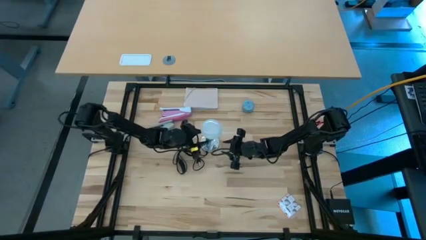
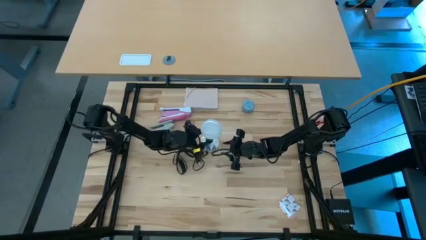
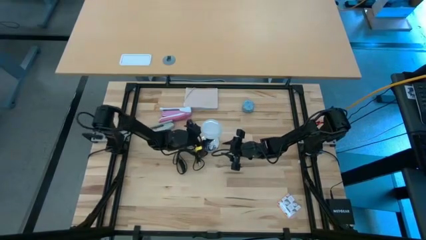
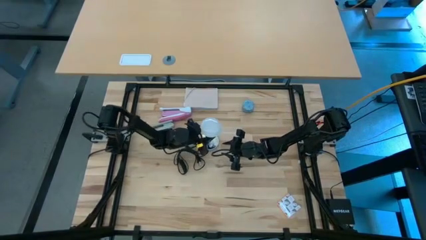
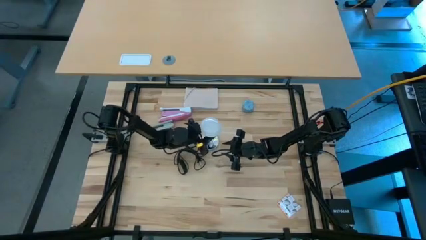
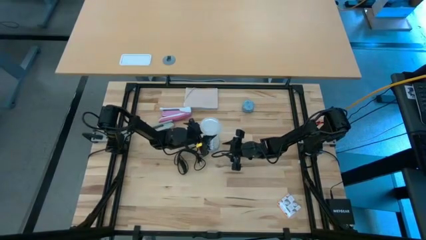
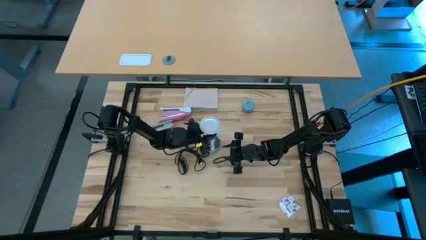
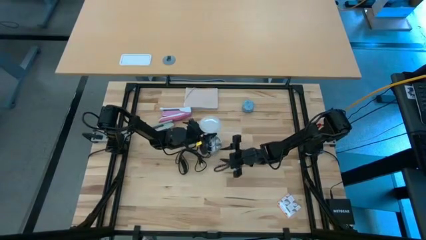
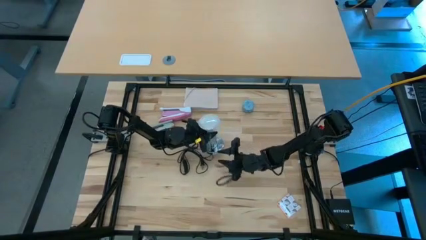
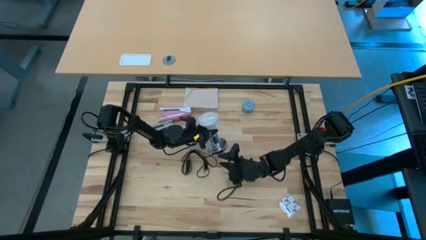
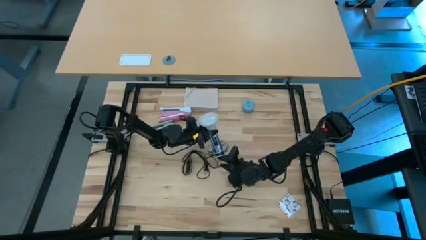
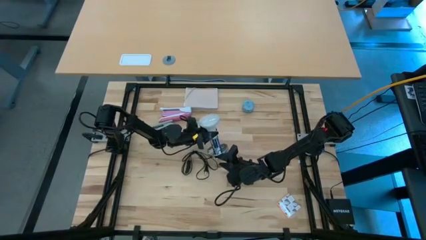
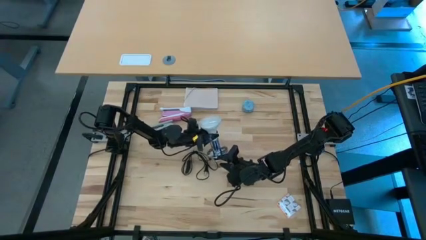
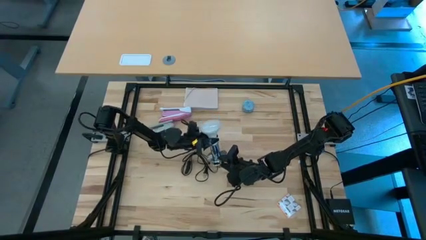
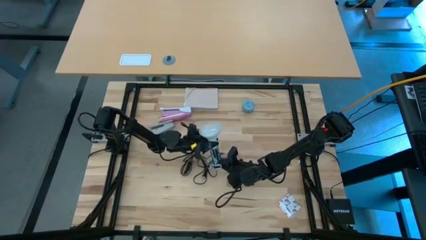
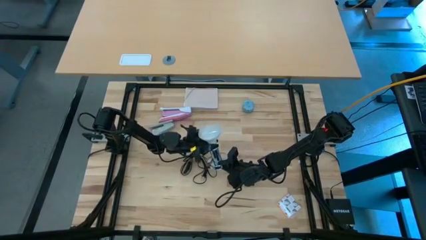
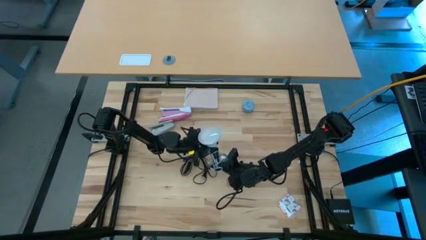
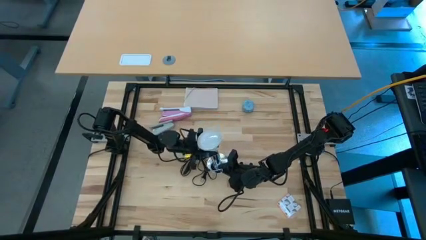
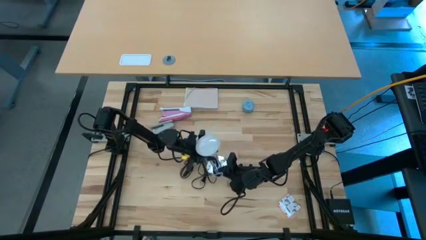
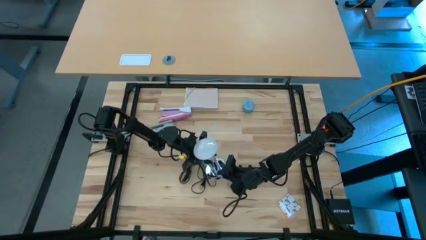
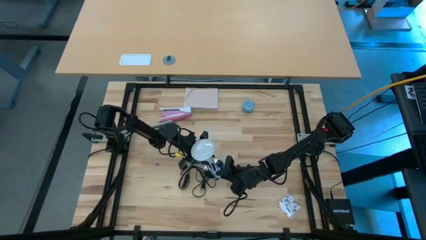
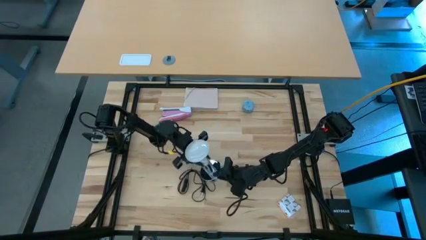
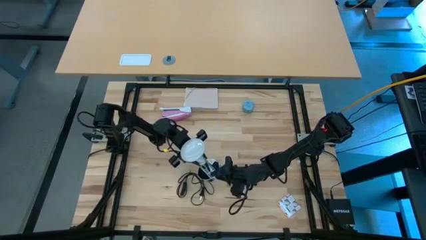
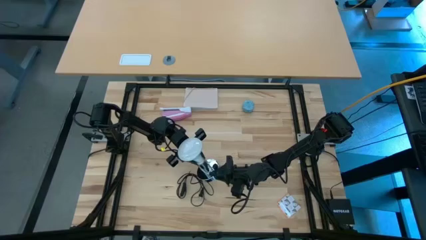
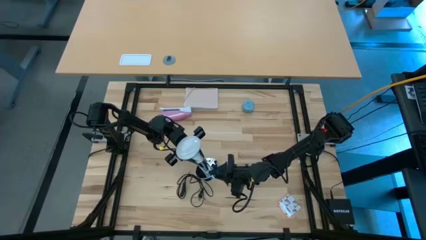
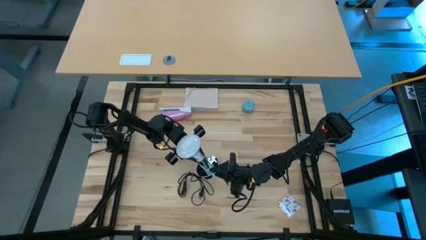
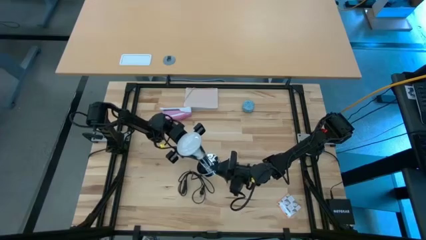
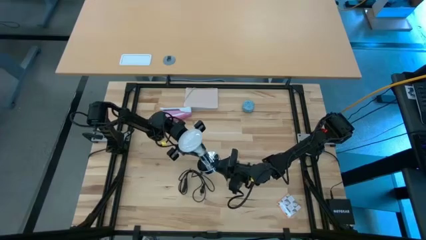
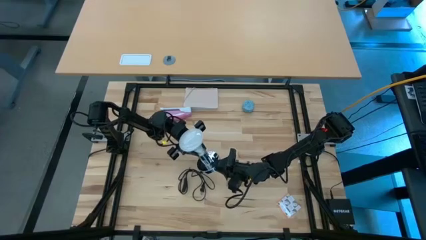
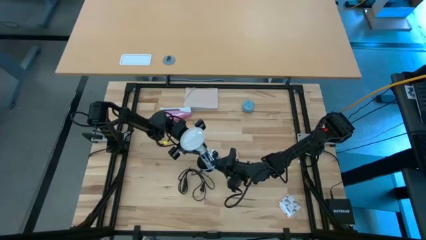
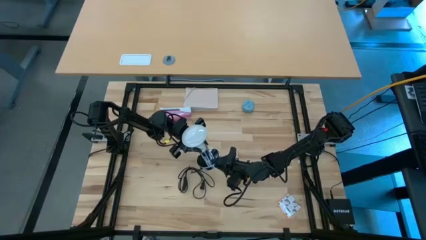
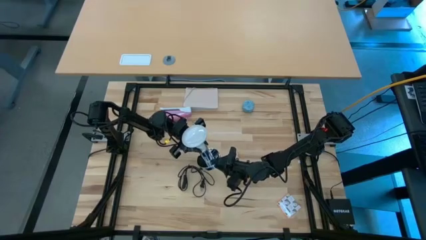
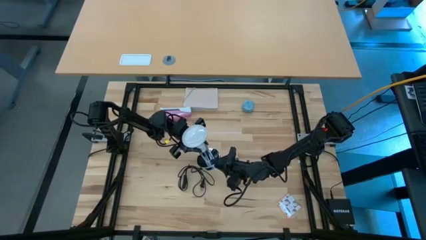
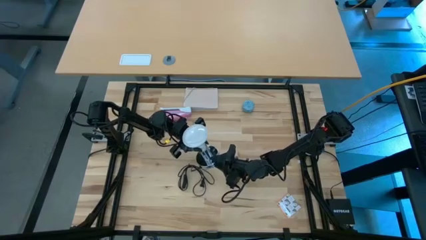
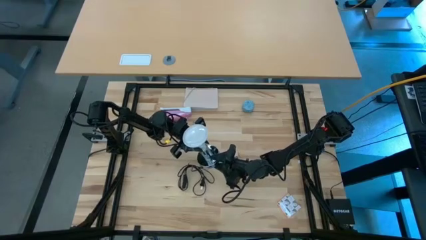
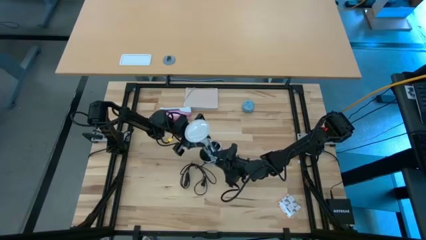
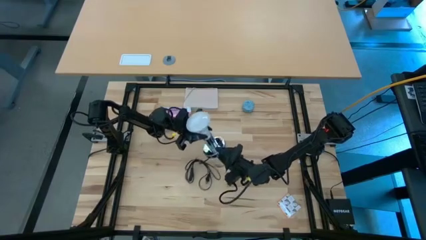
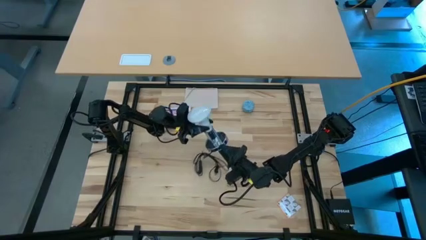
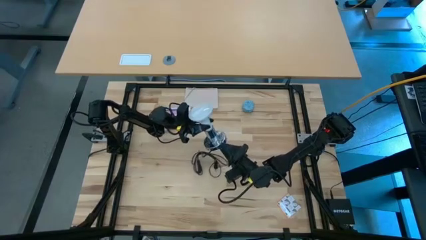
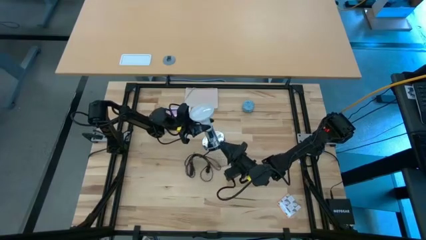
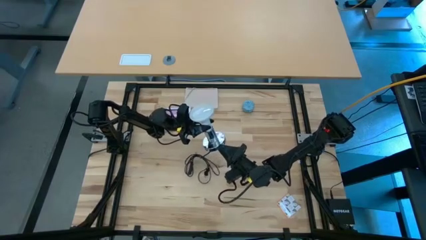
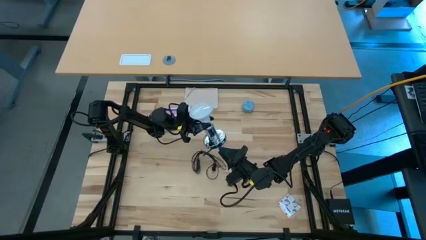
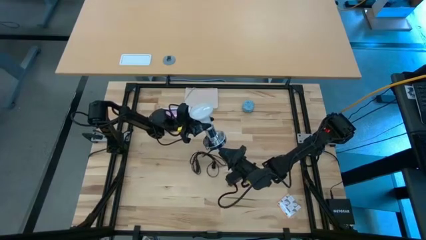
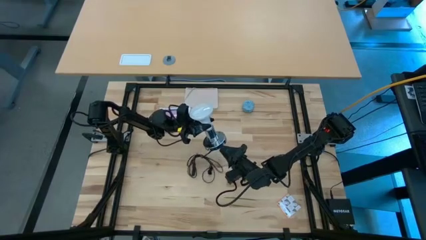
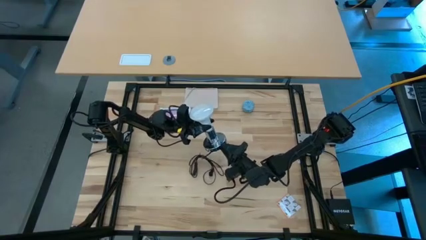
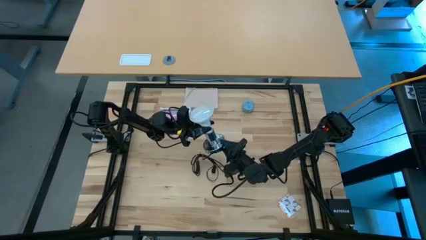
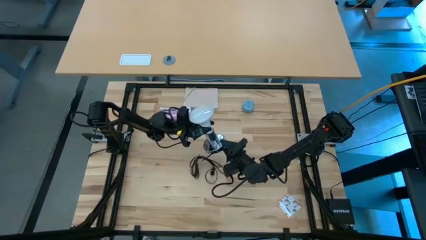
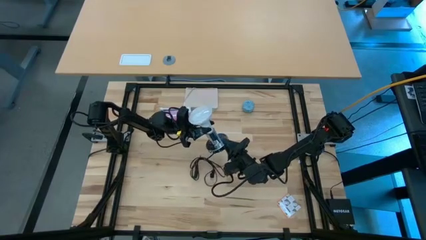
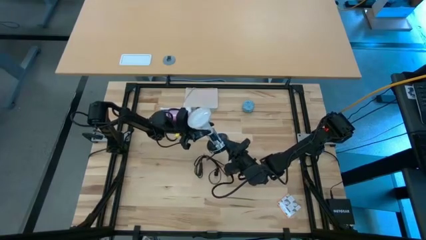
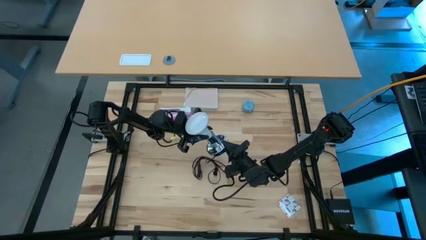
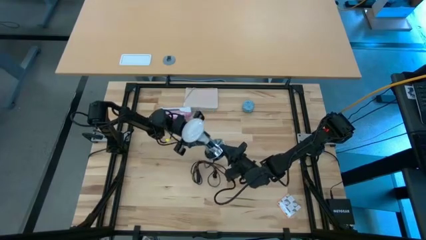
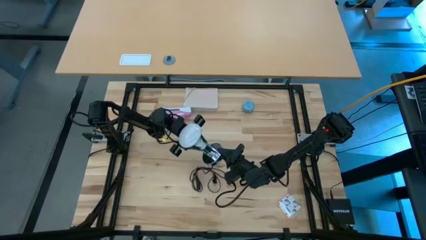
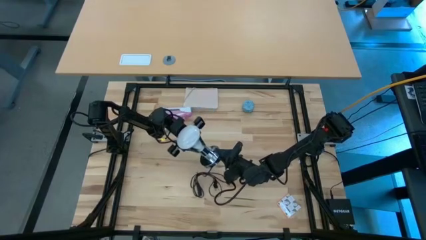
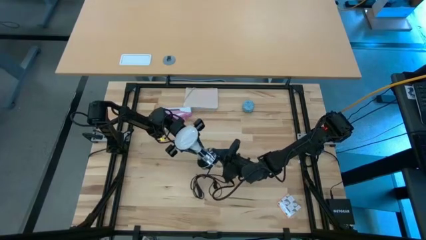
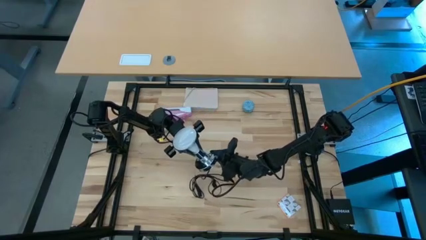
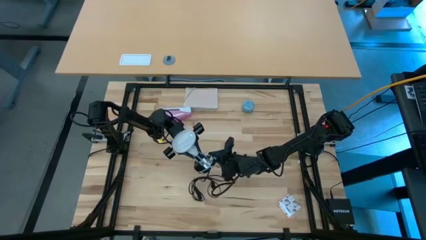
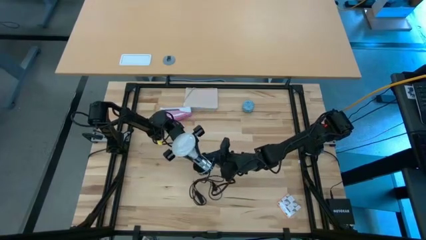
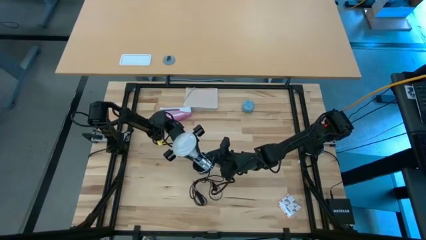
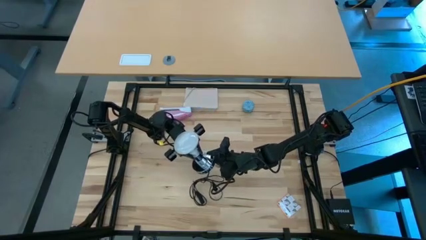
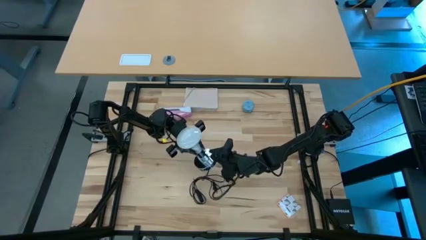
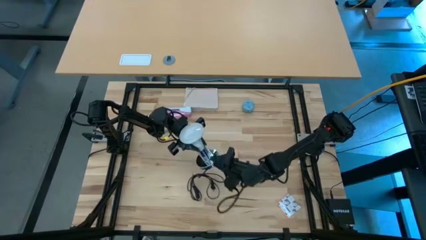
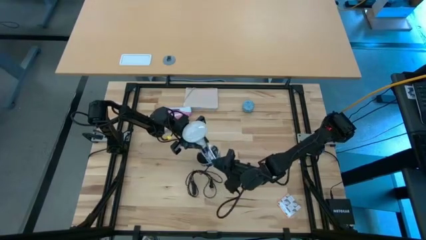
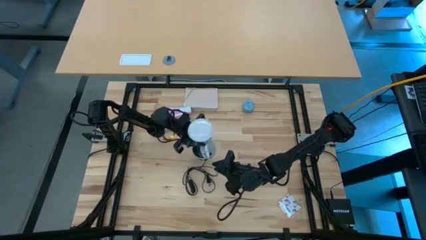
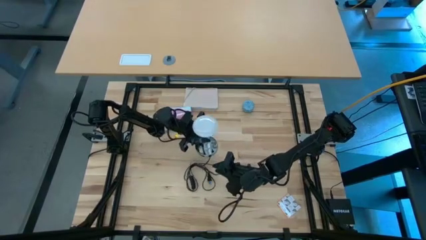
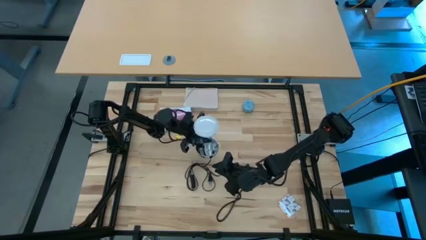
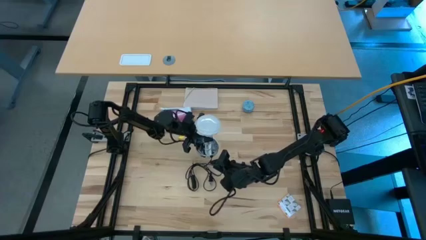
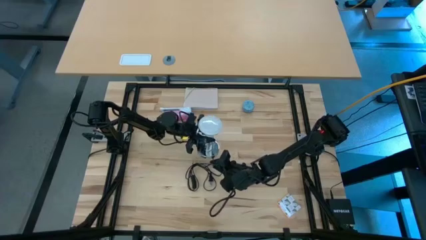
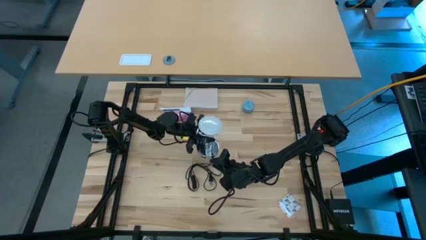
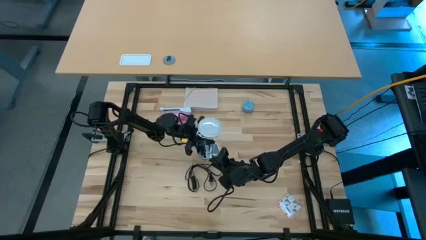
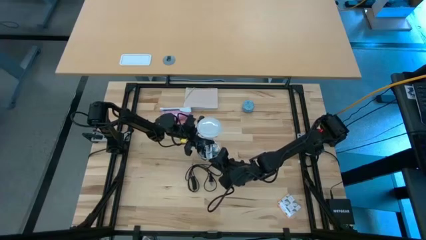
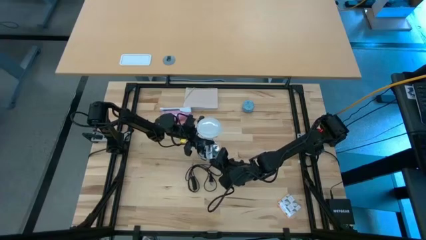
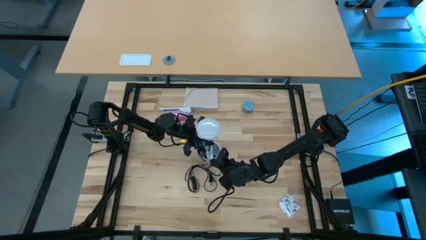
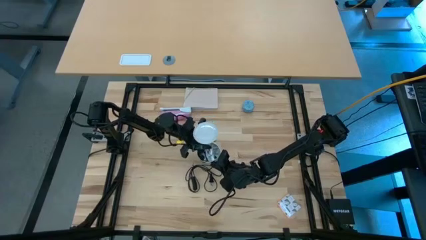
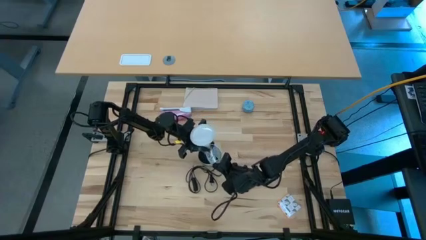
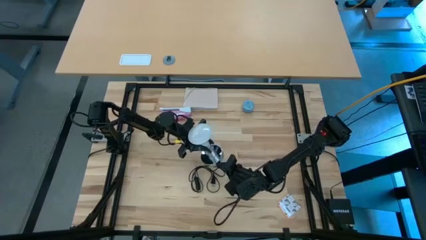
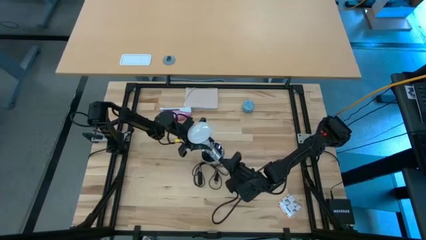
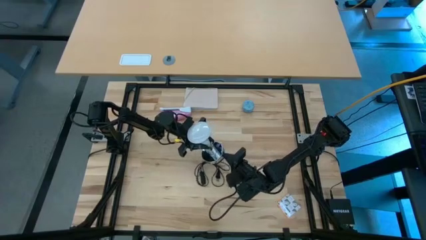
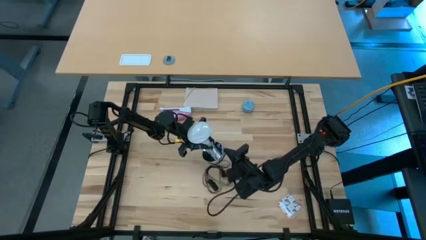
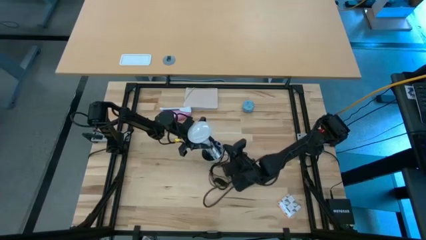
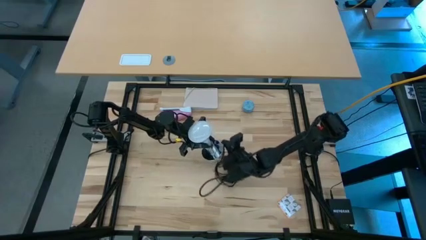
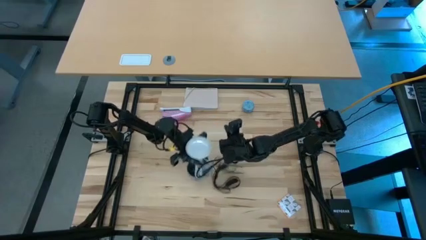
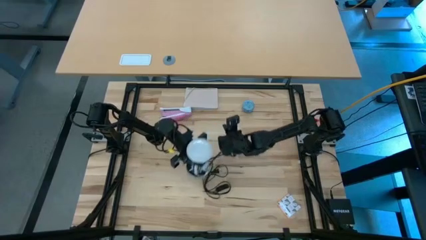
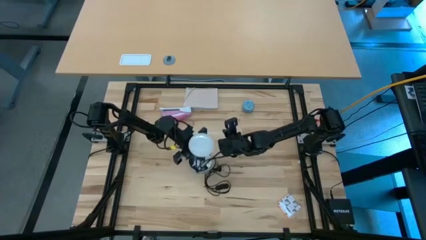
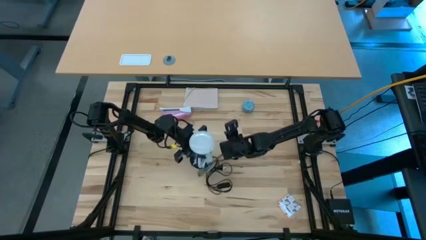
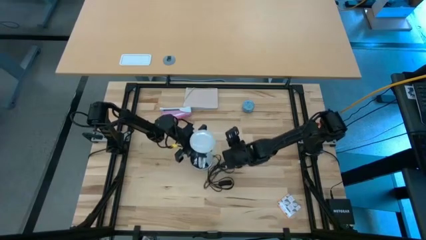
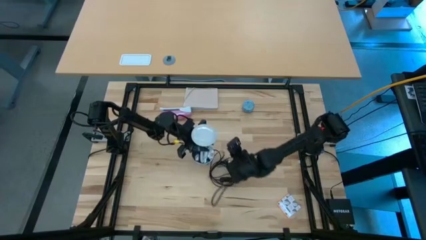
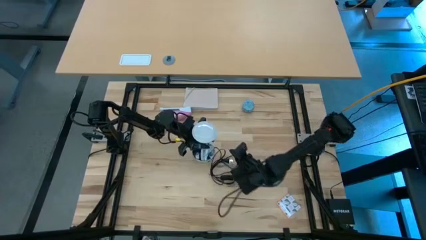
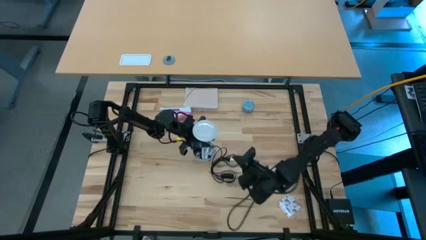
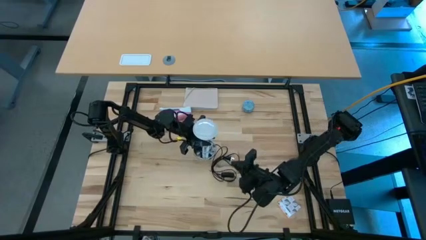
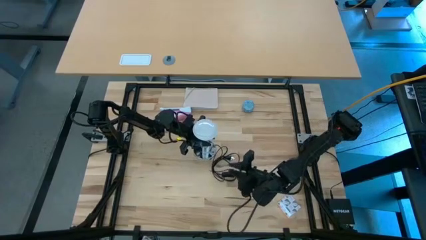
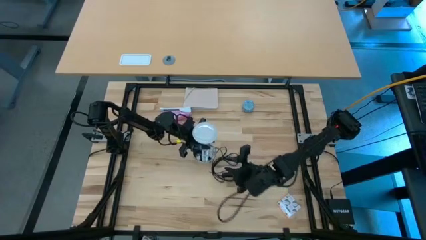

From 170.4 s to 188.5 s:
Task: Screw lightbulb
Insert the white lightbulb into the desk lamp
